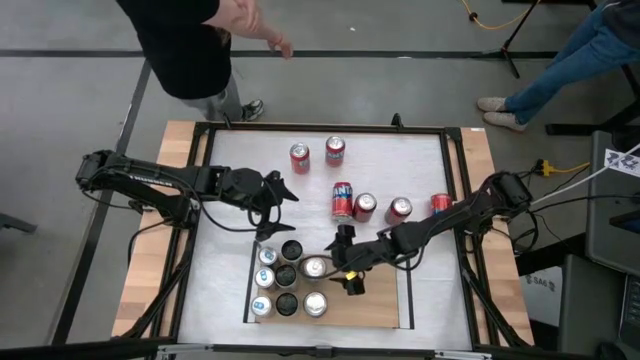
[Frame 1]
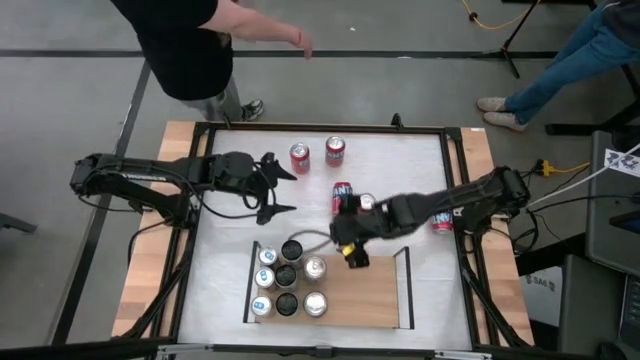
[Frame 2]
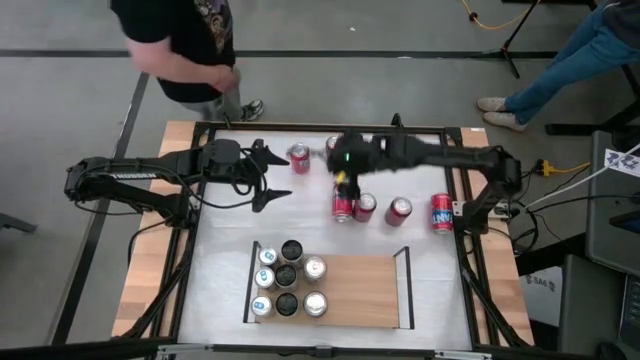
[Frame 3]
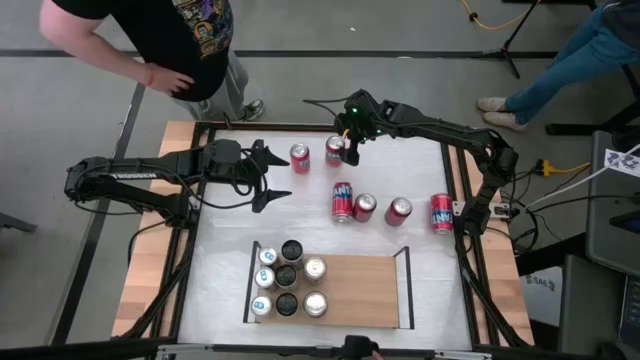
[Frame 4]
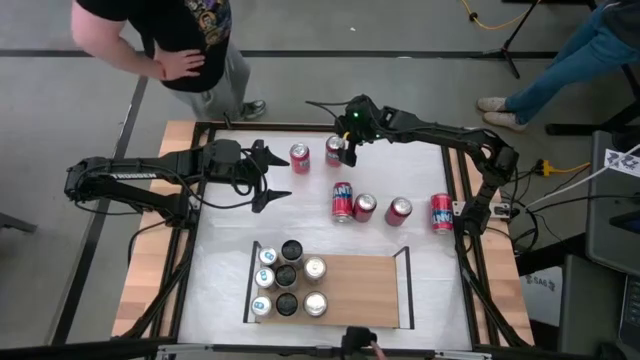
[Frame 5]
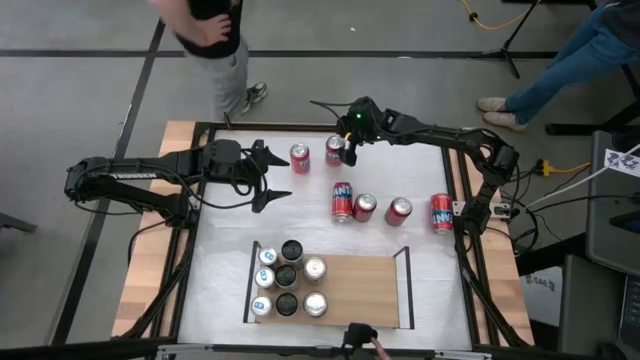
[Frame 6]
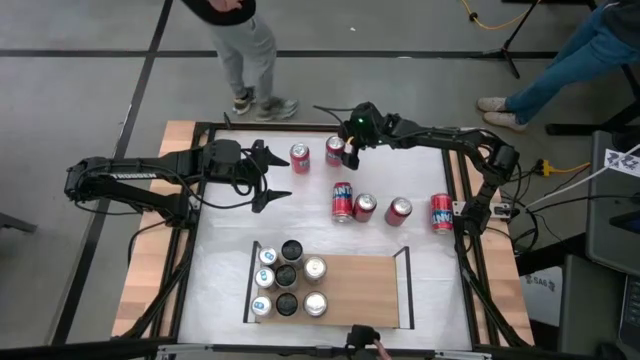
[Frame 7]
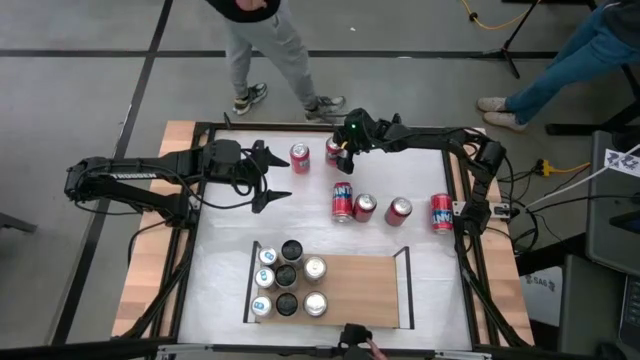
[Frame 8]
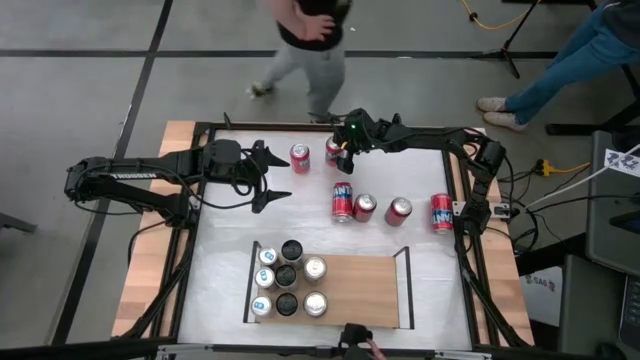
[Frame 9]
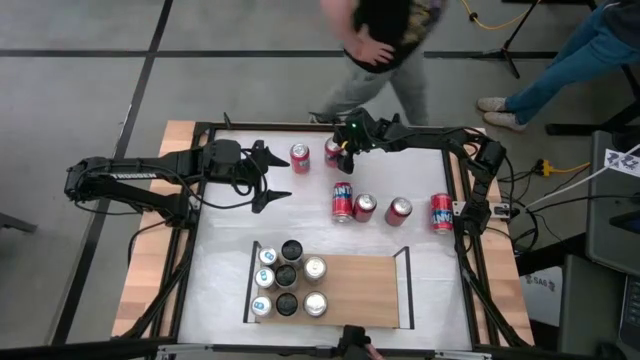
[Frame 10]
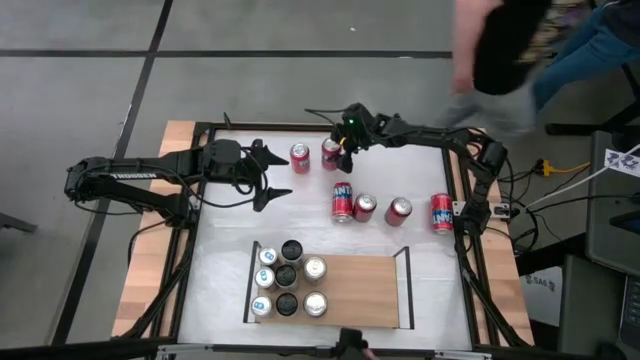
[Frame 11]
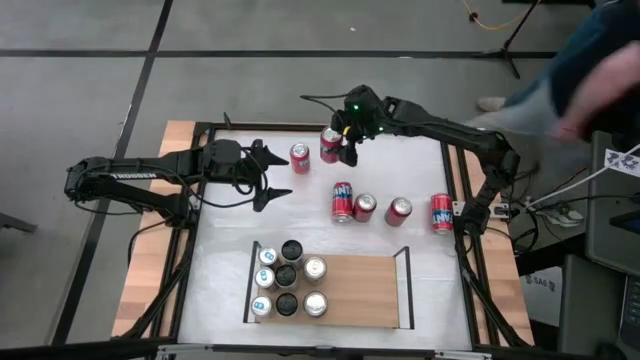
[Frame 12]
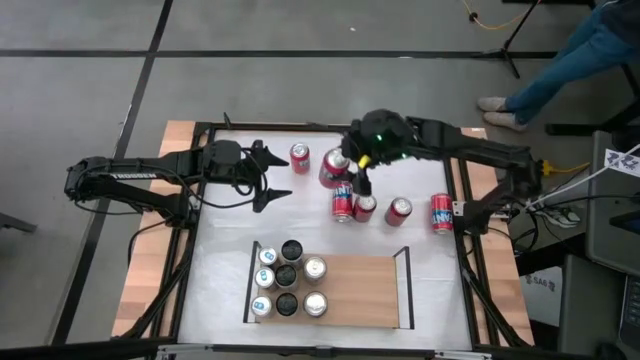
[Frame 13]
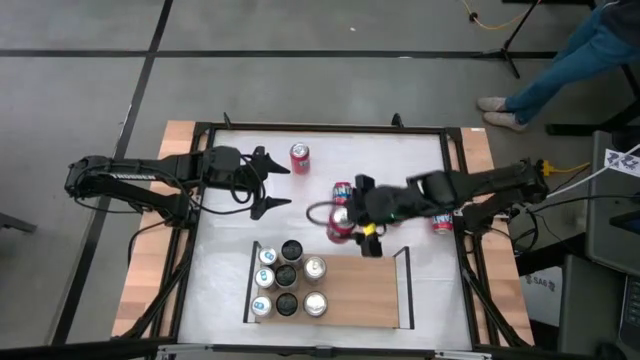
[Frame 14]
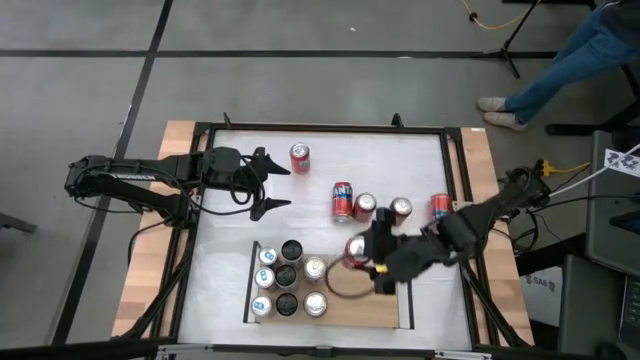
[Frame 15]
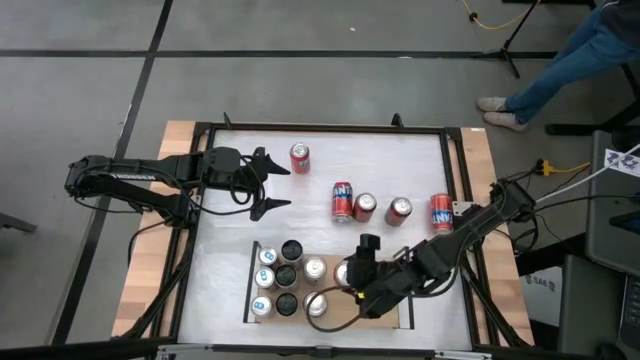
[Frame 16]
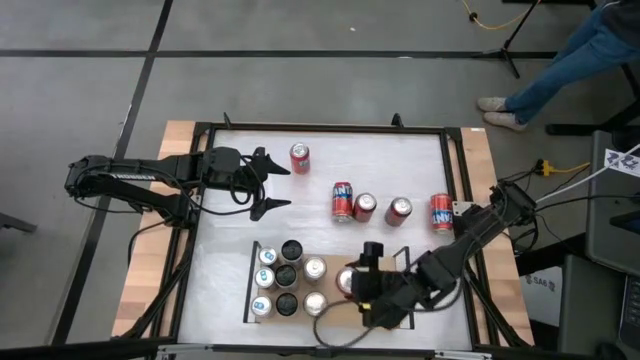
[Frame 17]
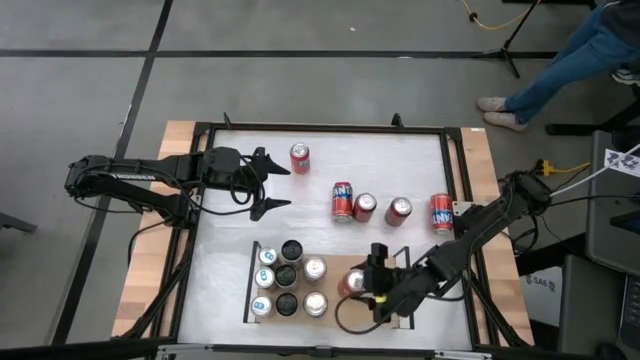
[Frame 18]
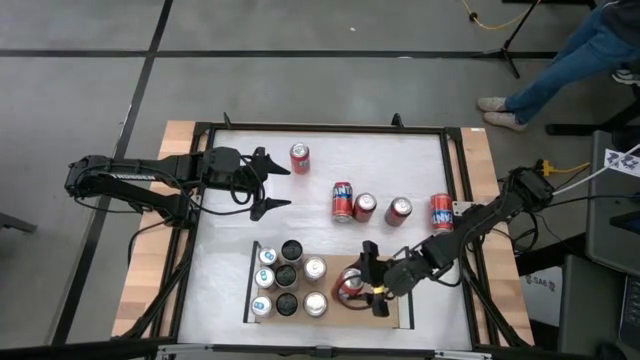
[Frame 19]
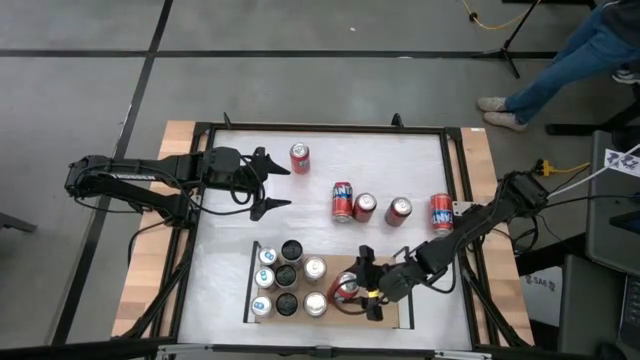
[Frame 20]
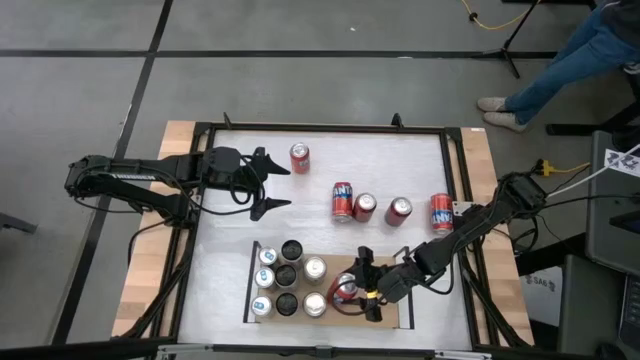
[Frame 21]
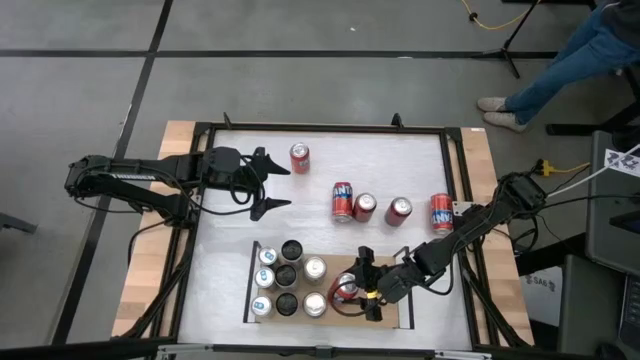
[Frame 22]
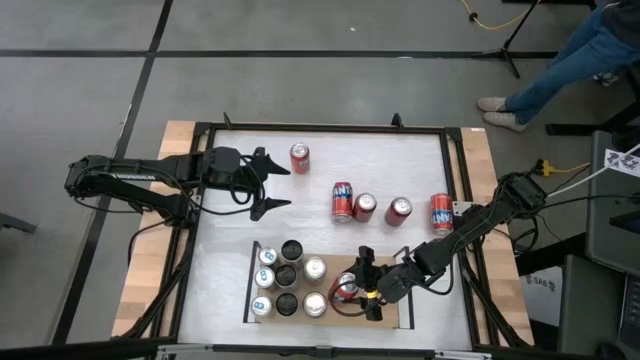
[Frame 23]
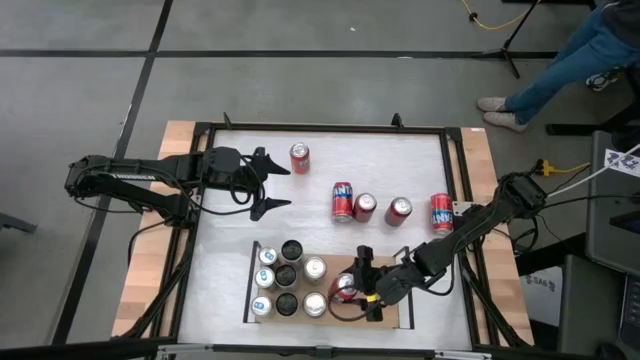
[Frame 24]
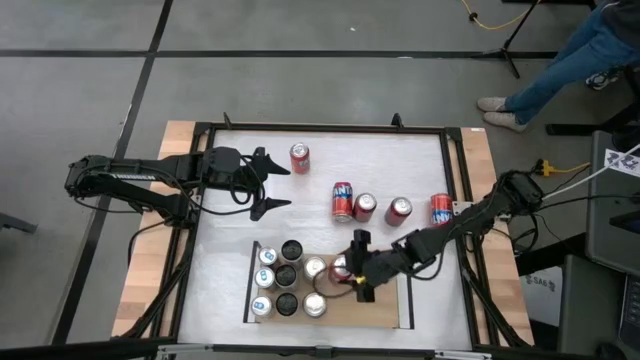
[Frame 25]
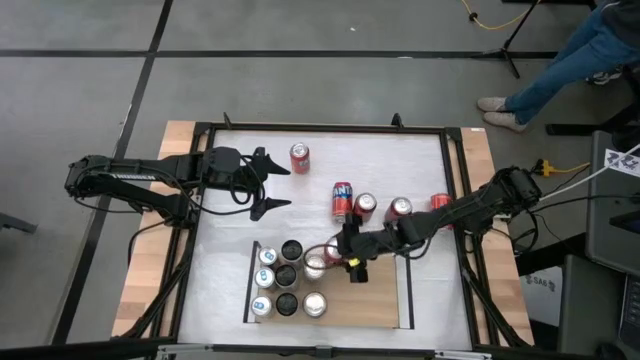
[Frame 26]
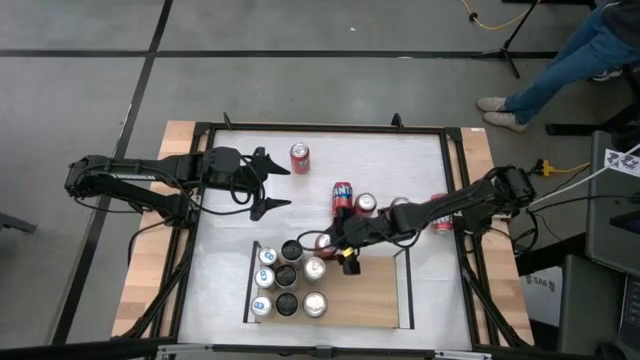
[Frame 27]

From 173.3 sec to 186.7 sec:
Task: Place canned beverage on shelf
Put the red soda can on the shelf aligned with the silver soda can

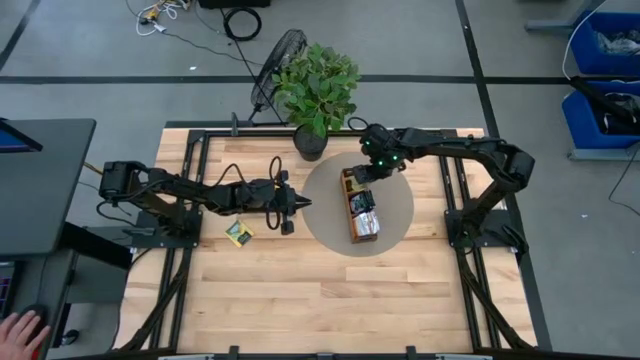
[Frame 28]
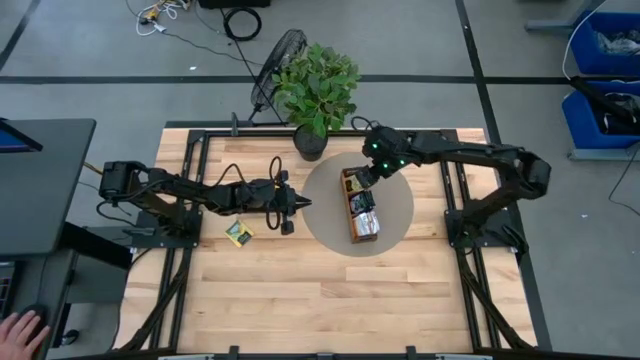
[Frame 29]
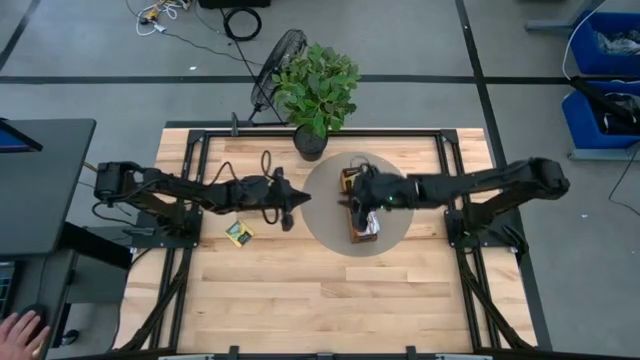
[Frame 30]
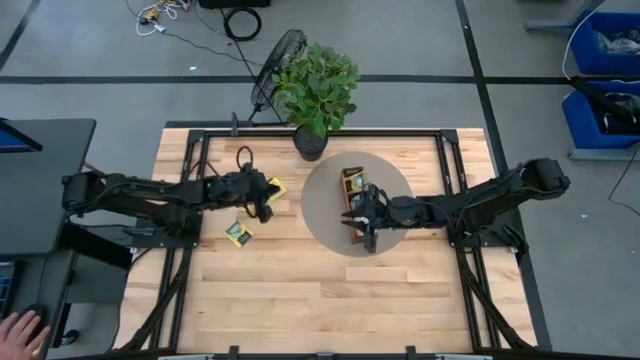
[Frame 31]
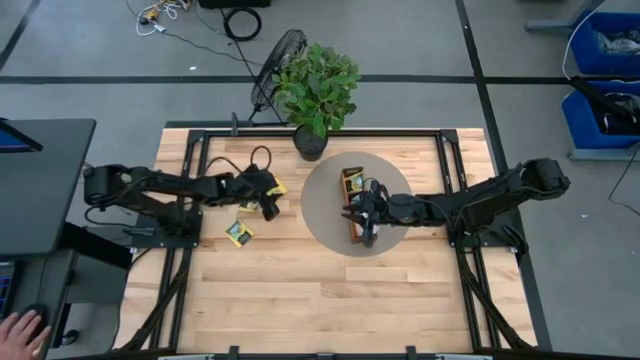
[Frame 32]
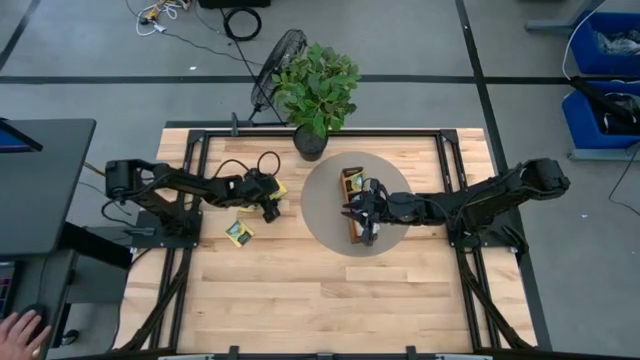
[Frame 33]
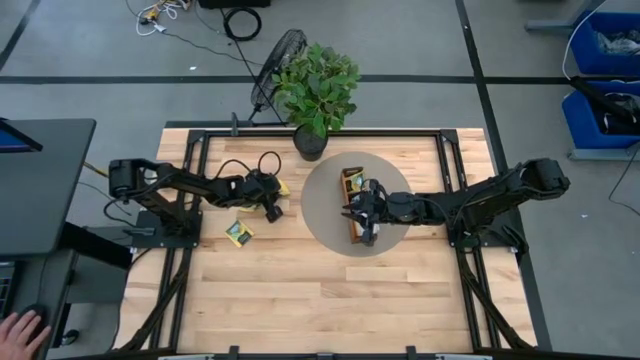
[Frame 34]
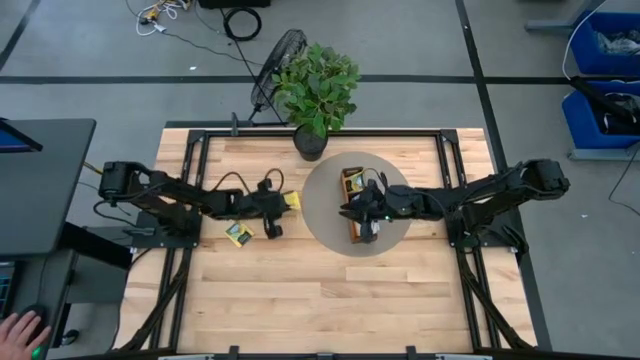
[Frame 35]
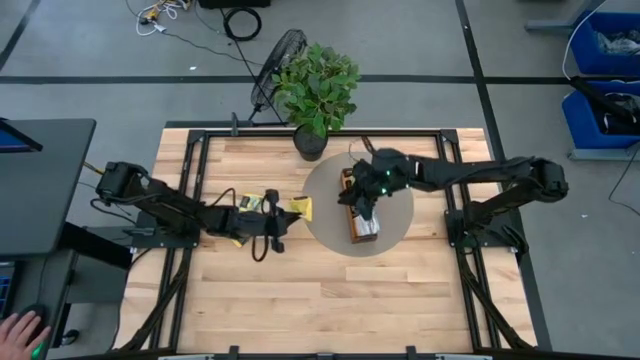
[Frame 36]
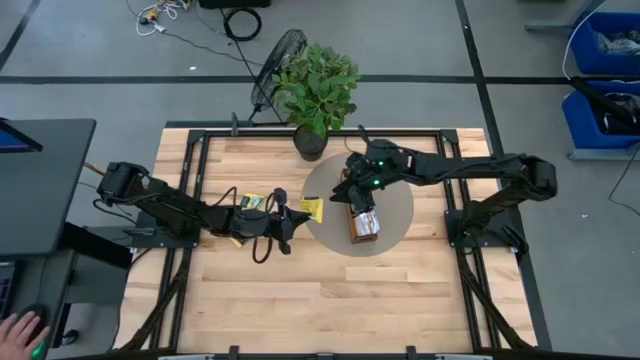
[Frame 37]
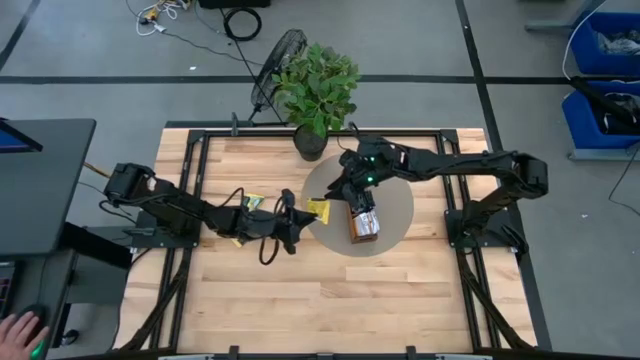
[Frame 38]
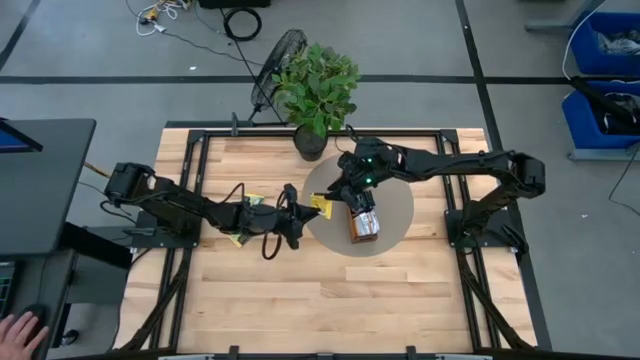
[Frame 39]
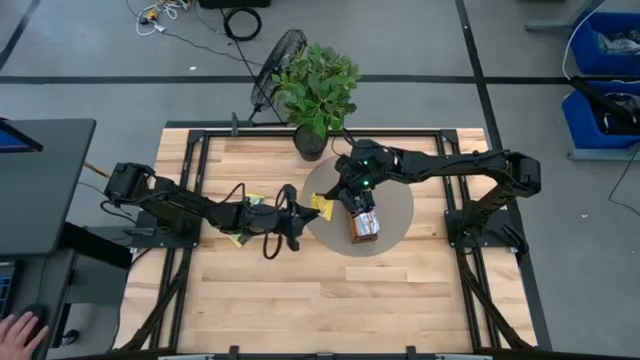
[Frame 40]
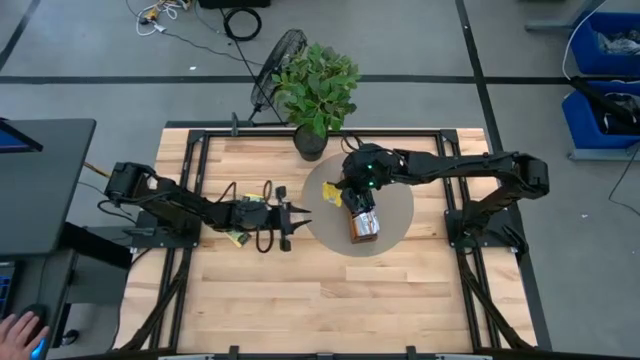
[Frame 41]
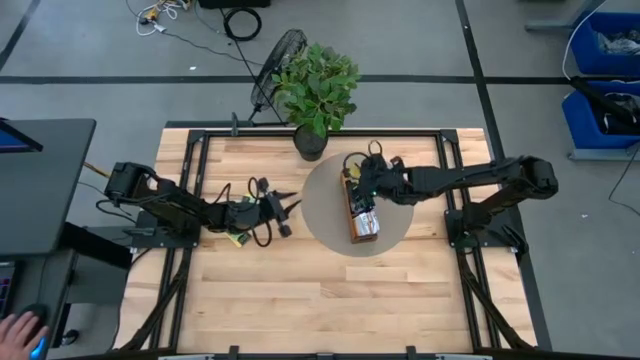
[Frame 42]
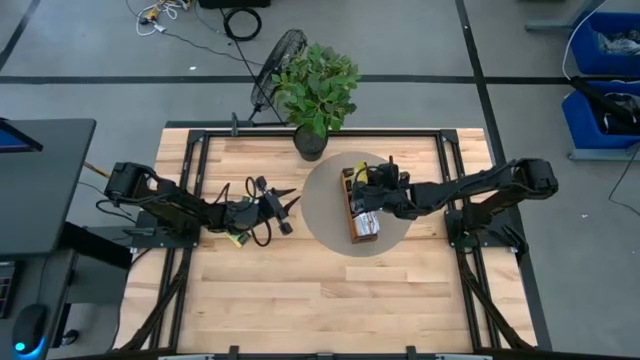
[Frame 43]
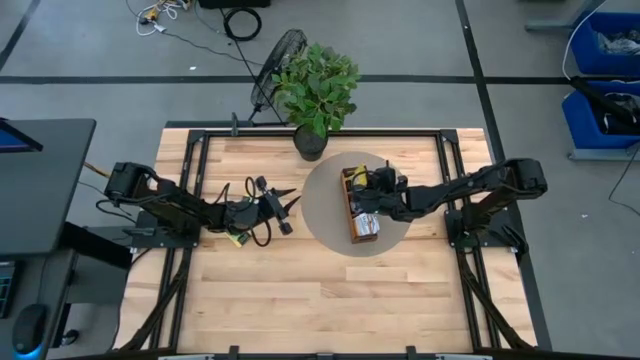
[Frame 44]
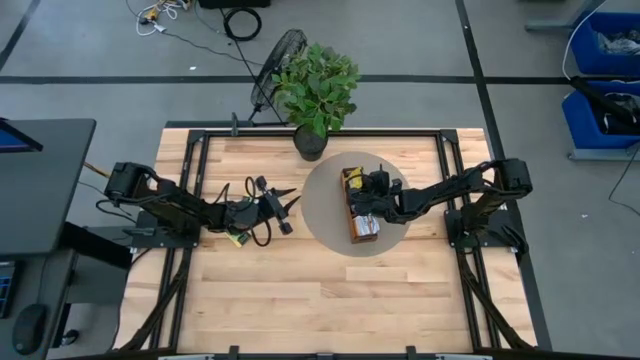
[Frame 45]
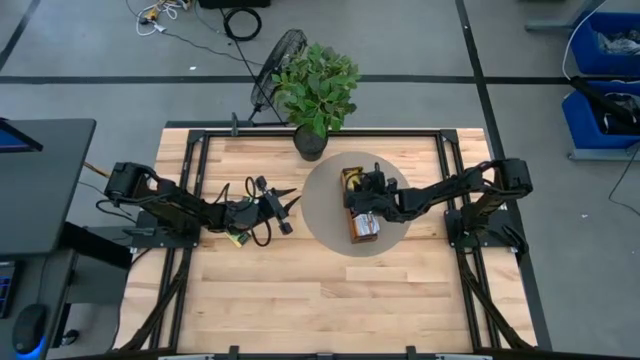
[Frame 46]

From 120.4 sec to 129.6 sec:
Task: Pick & Place Tea
Put the yellow tea bag into the top section of the wooden organizer
